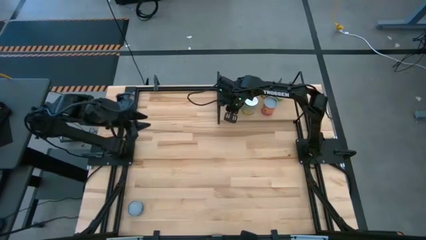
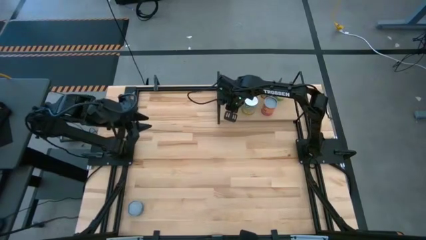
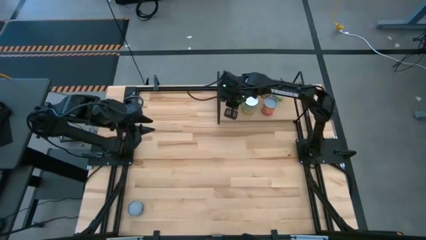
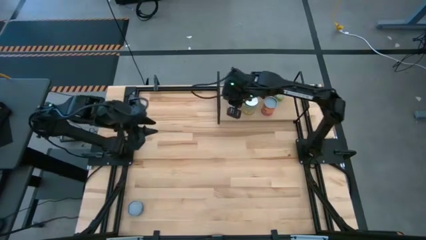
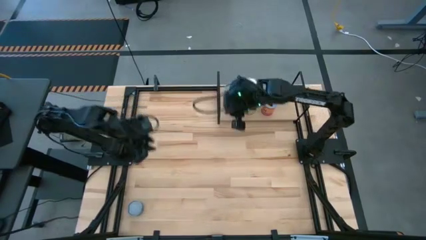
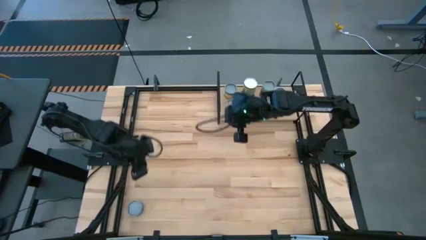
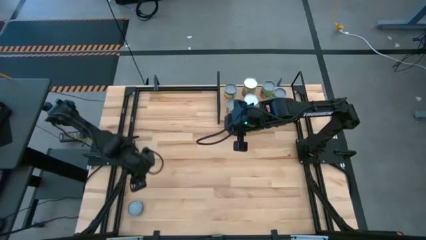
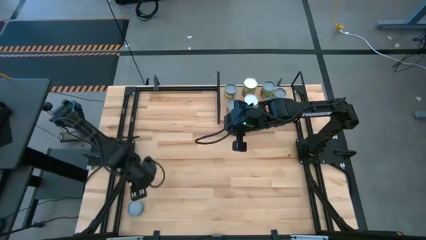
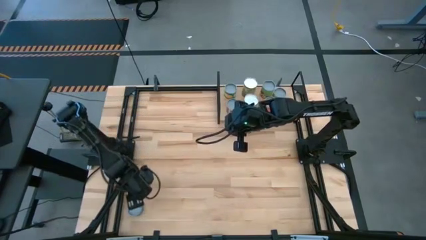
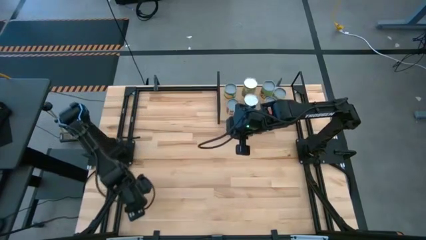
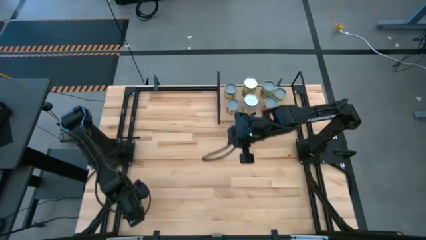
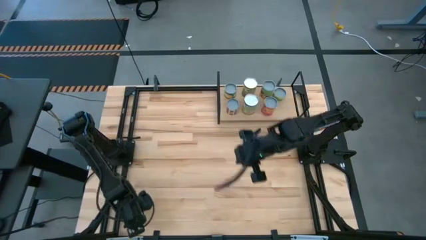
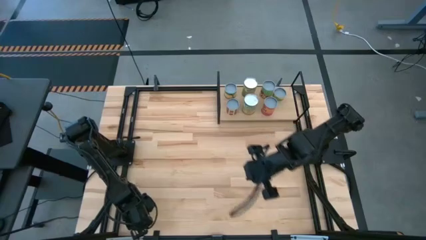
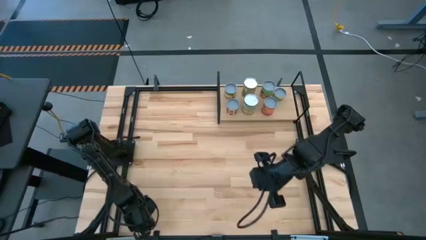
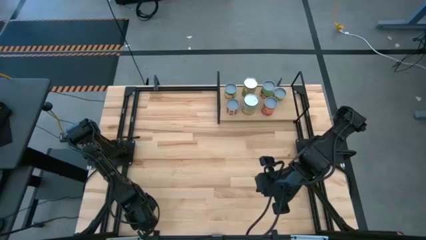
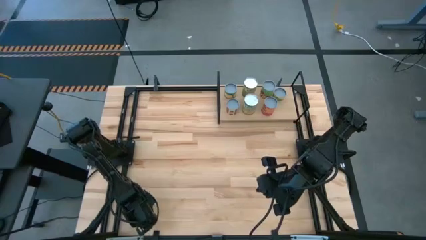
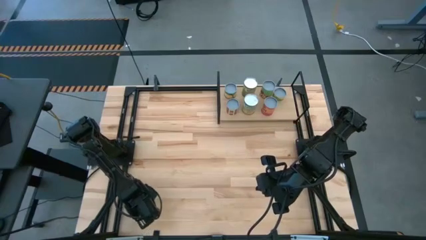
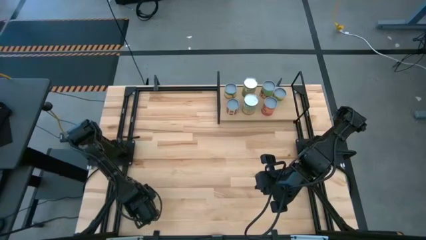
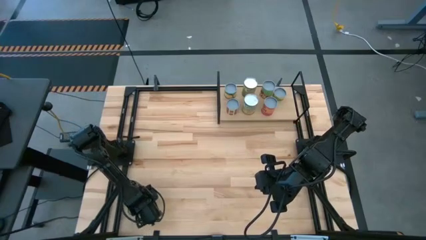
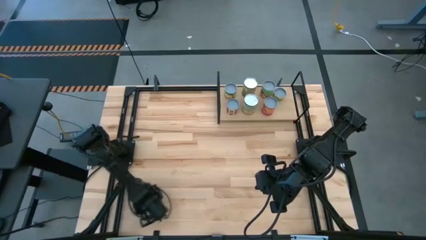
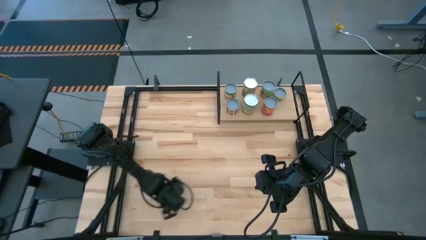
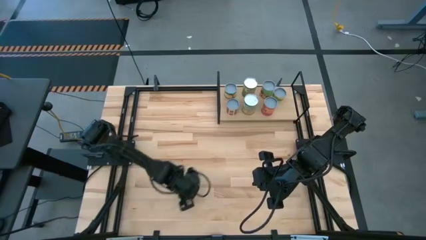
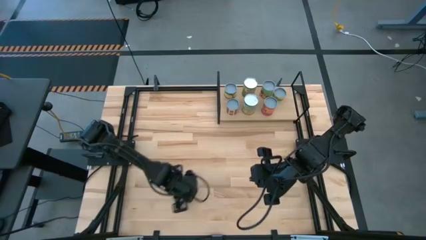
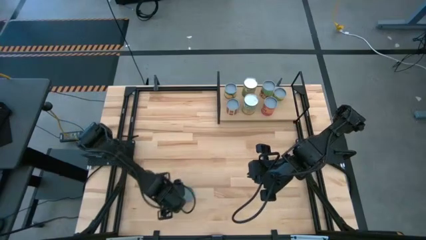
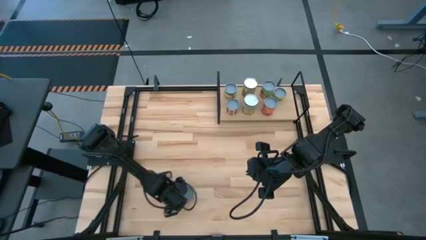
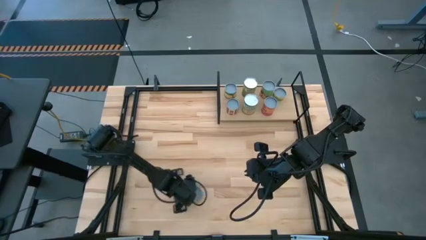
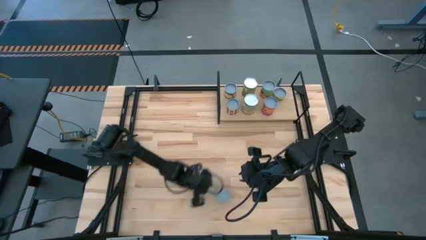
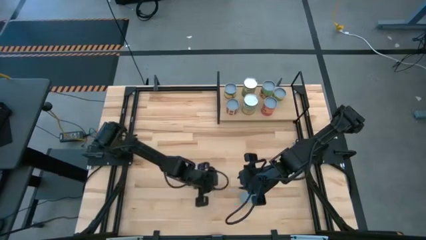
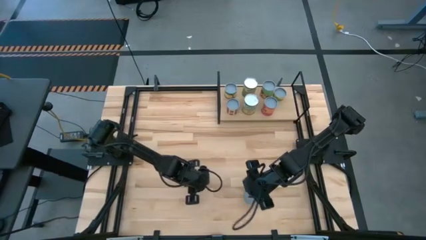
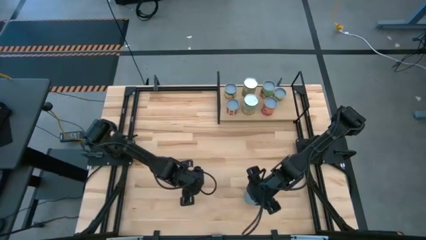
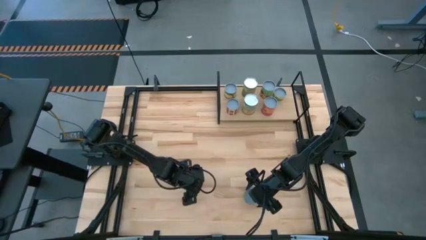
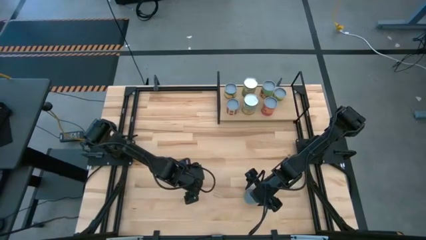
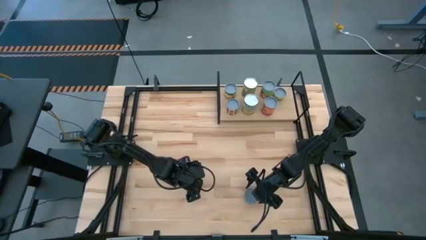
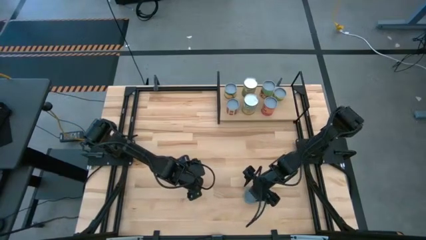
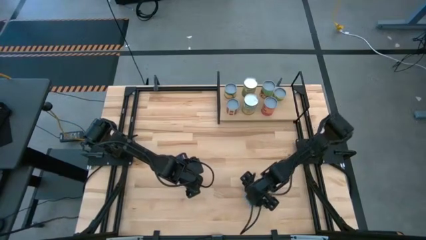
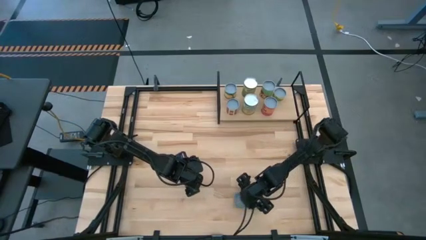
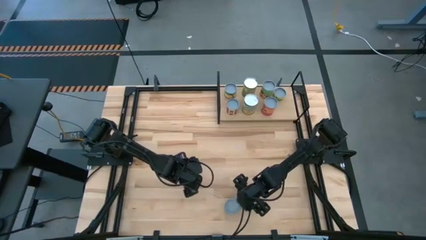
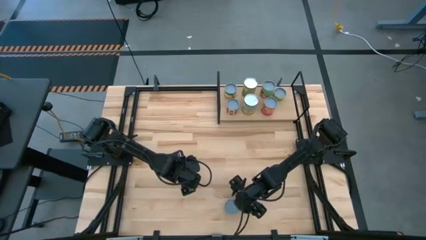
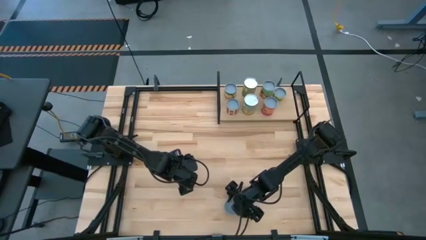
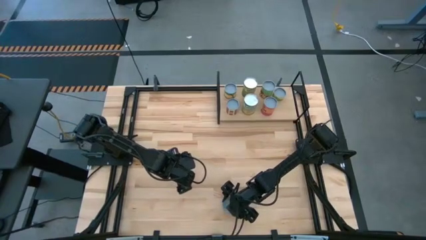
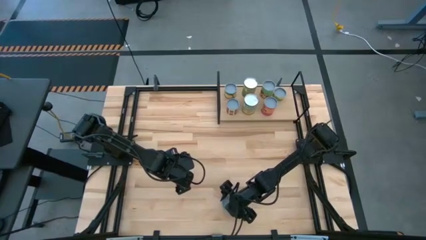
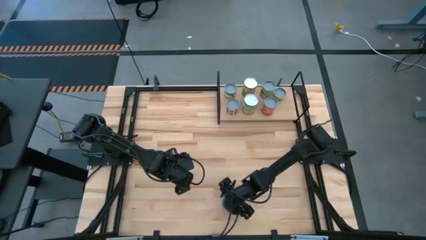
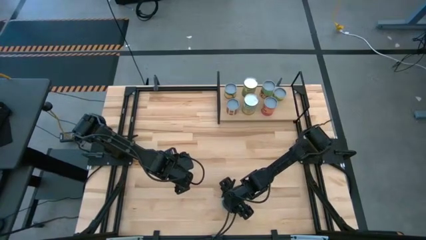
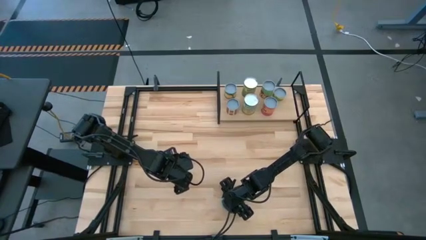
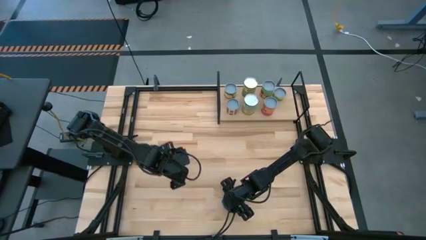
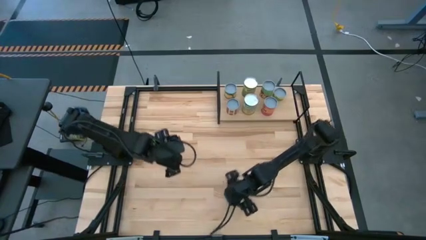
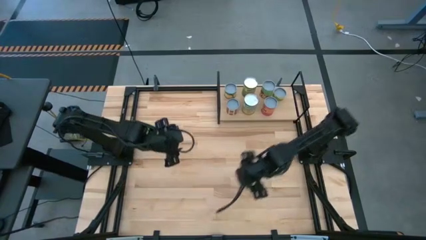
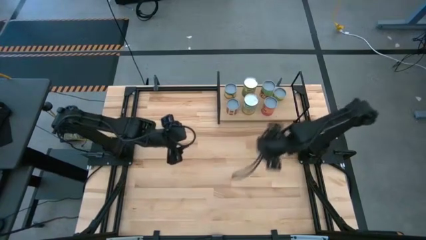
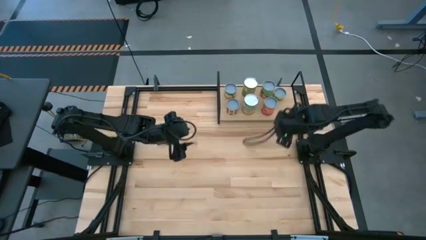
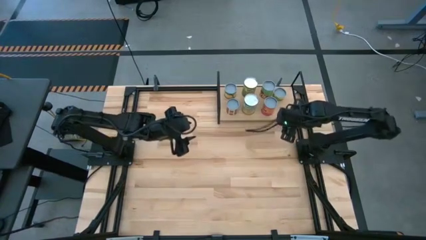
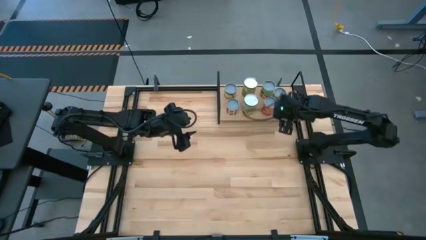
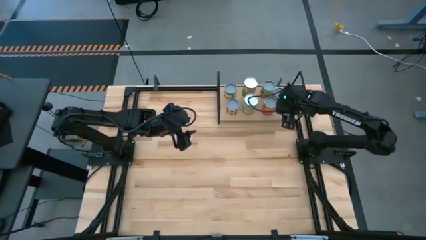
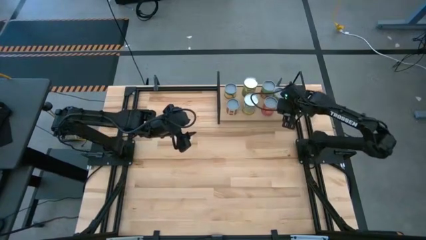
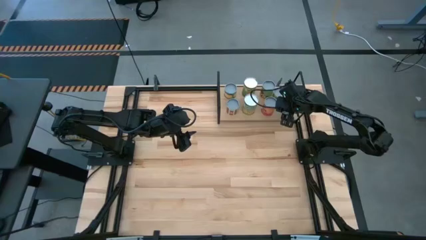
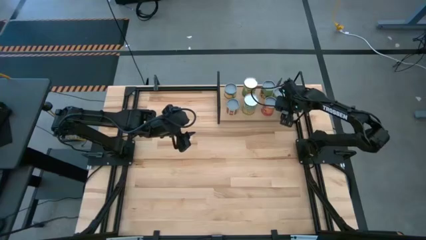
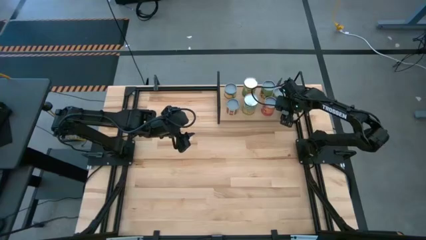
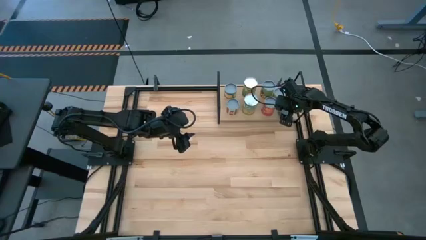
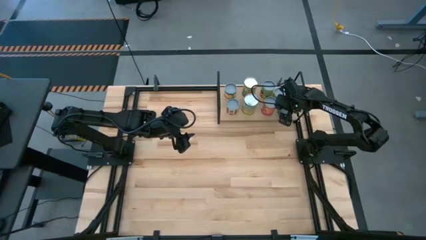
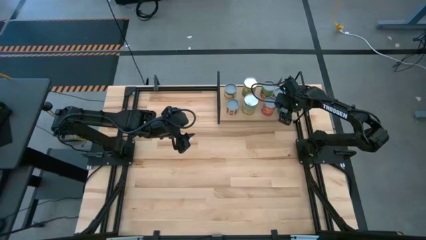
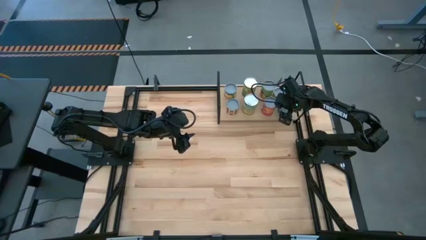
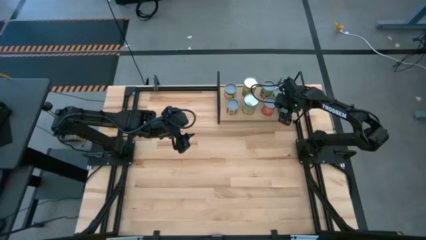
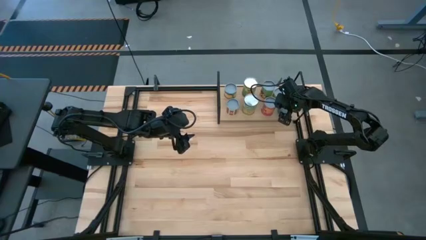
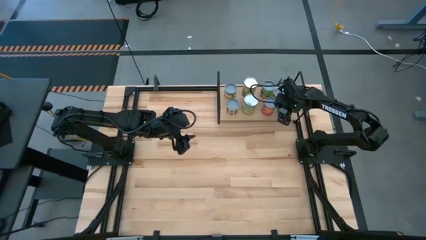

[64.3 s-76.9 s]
Task: Pick and place cans onto a shelf
Put the green can on the shelf

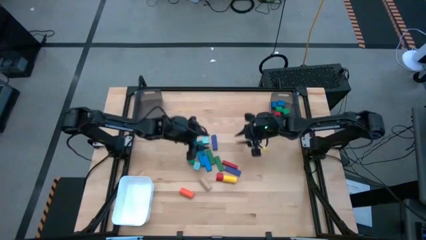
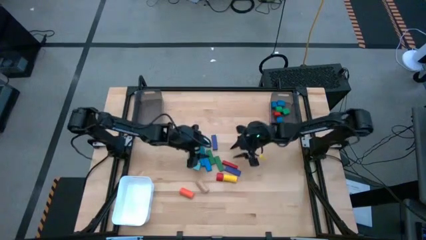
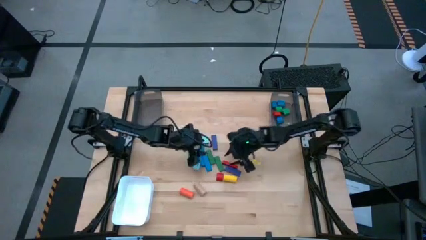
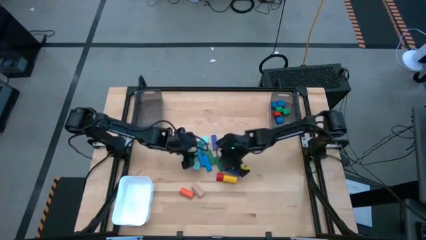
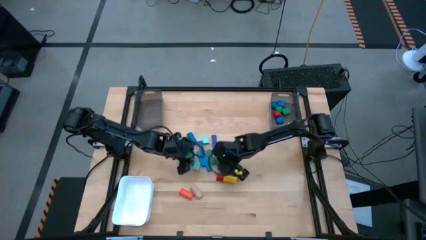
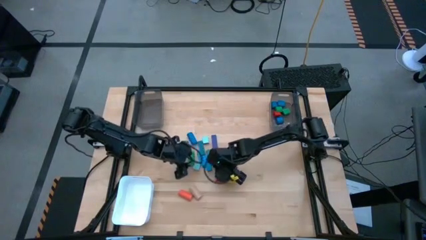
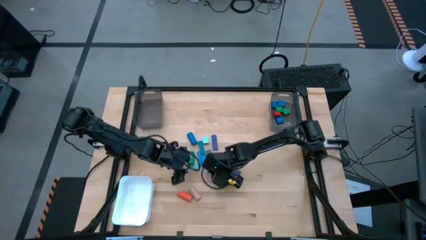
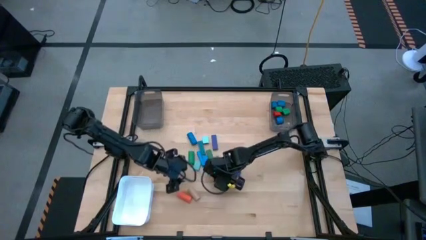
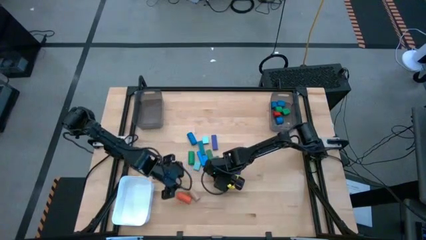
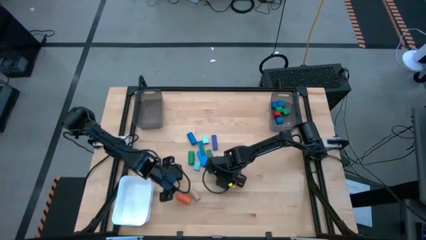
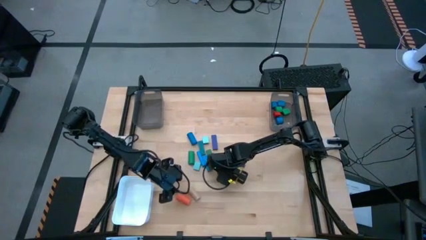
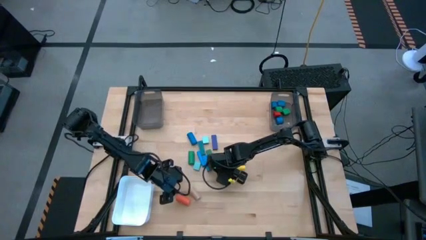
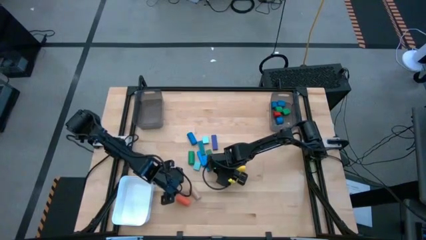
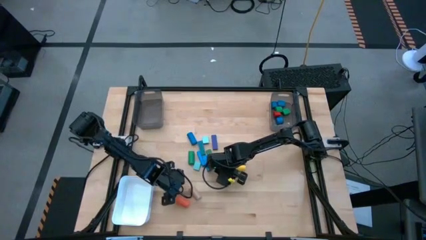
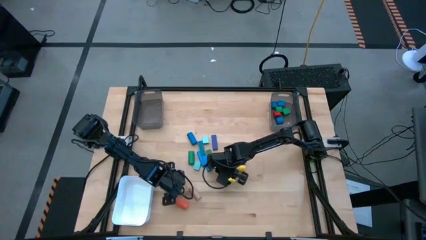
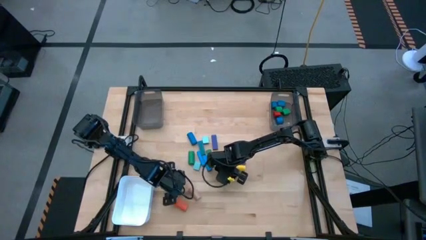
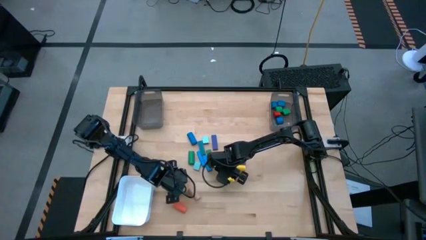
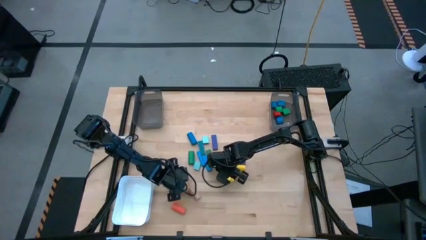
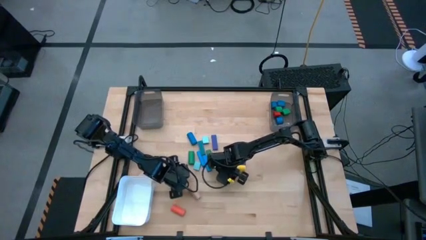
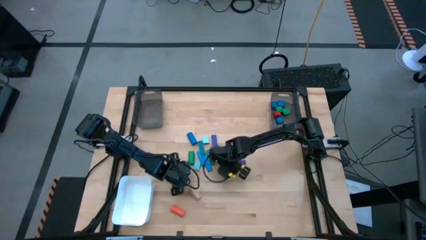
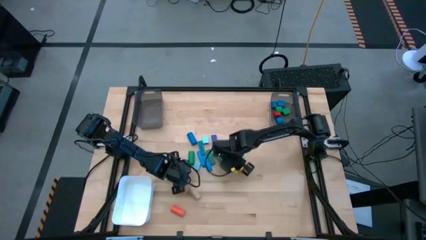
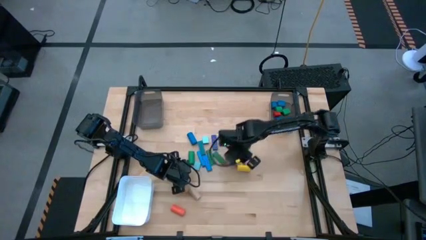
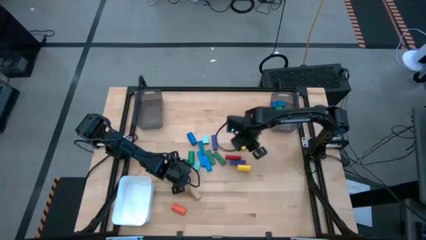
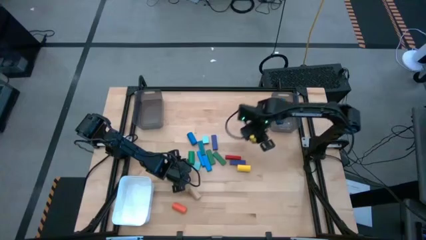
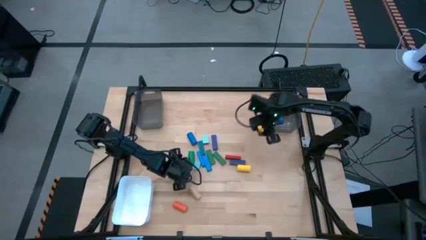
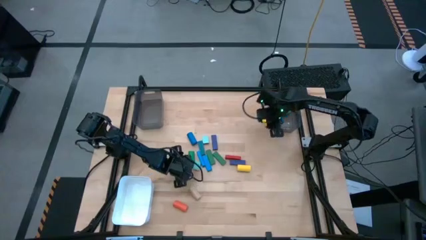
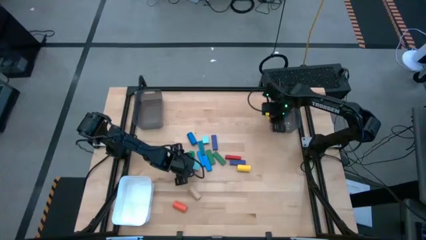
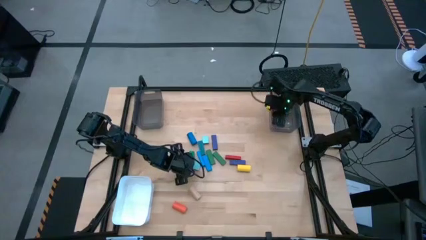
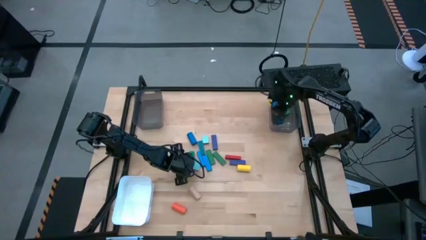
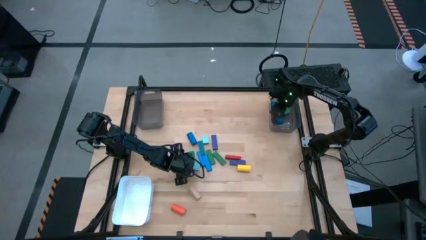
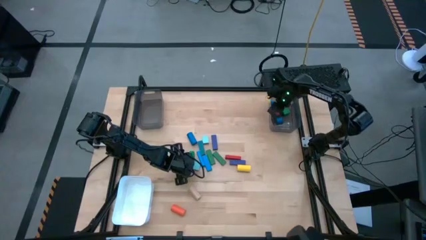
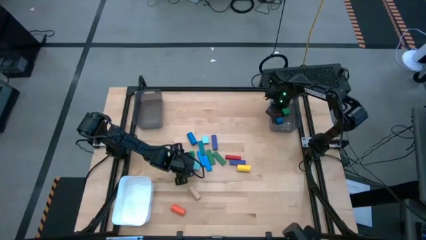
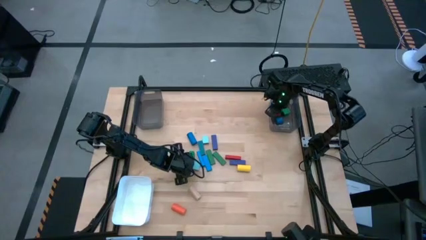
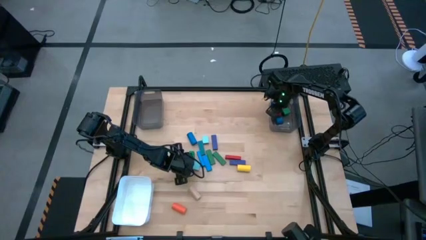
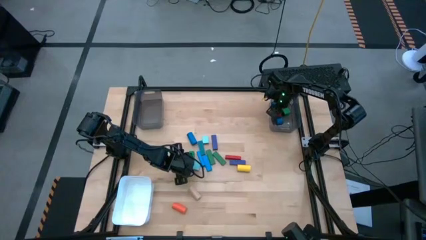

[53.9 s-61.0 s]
Task: Sort blocks by size
Put the red half circle block into the right black bin
